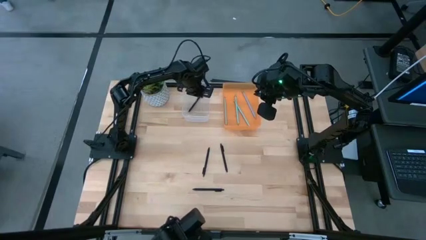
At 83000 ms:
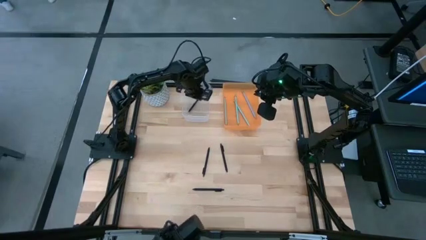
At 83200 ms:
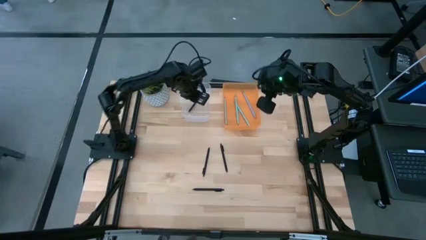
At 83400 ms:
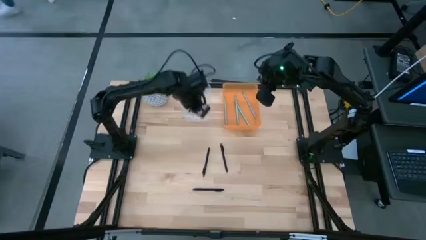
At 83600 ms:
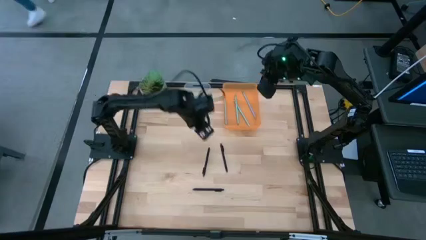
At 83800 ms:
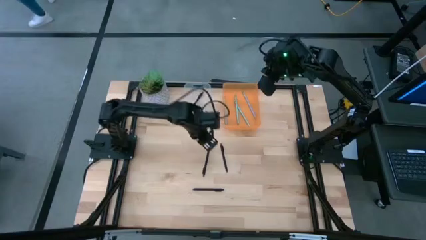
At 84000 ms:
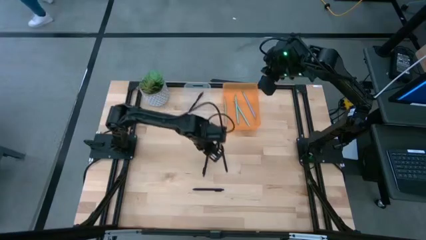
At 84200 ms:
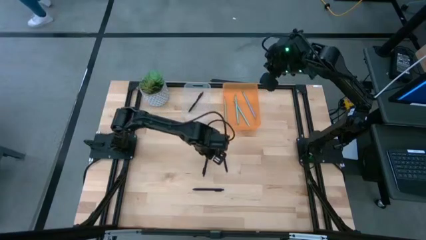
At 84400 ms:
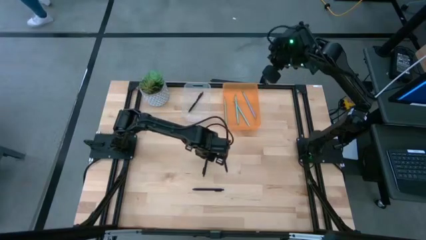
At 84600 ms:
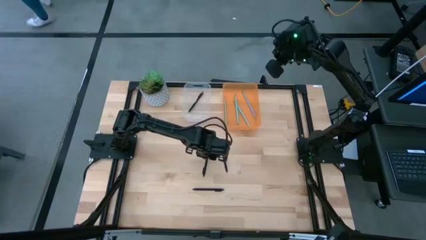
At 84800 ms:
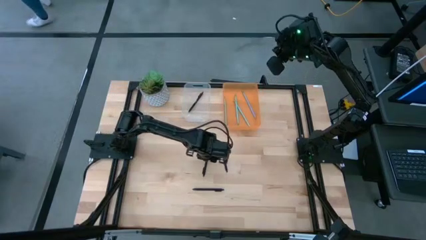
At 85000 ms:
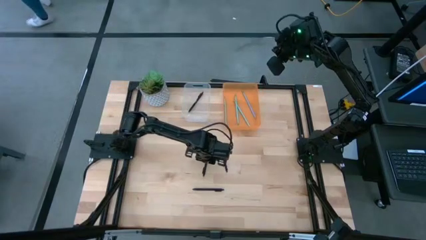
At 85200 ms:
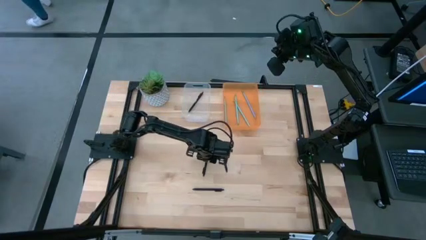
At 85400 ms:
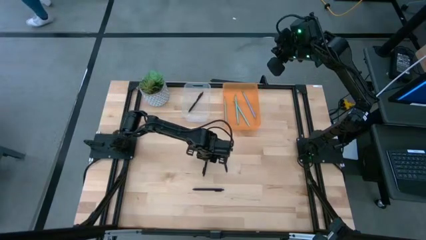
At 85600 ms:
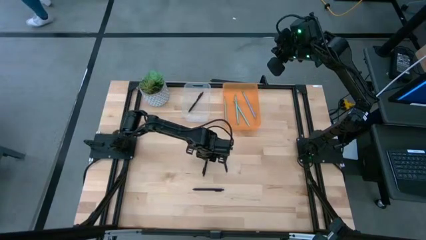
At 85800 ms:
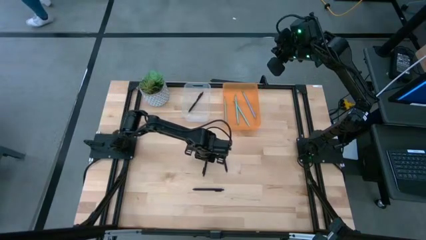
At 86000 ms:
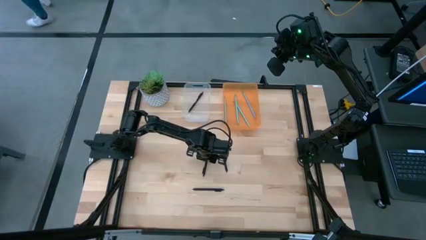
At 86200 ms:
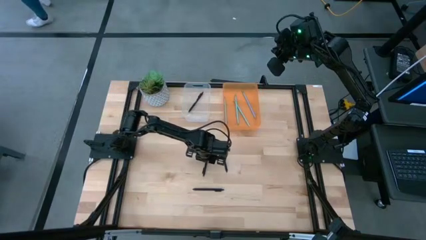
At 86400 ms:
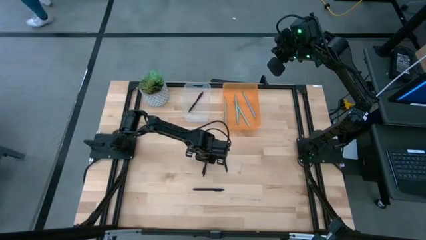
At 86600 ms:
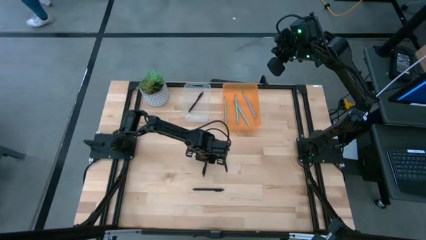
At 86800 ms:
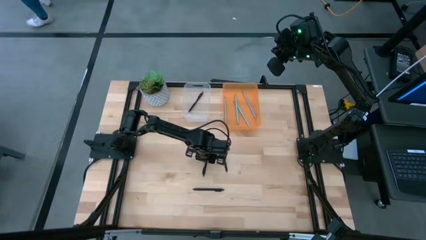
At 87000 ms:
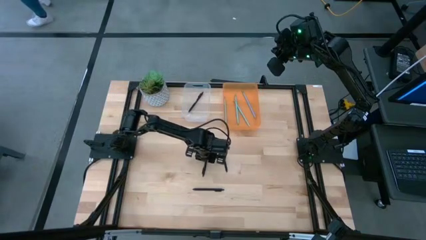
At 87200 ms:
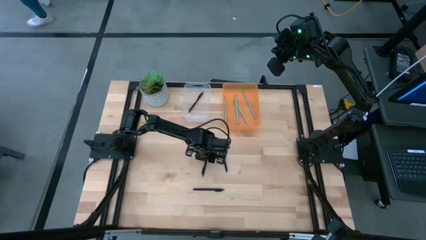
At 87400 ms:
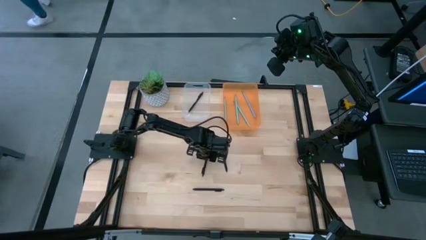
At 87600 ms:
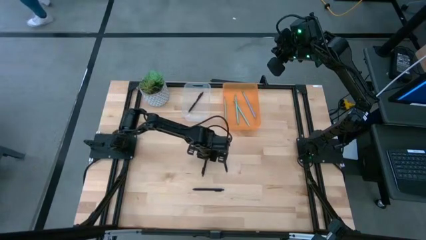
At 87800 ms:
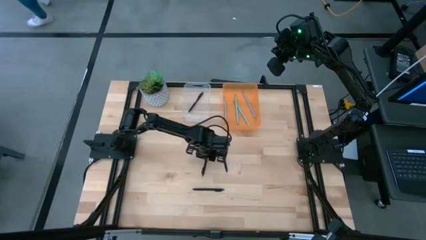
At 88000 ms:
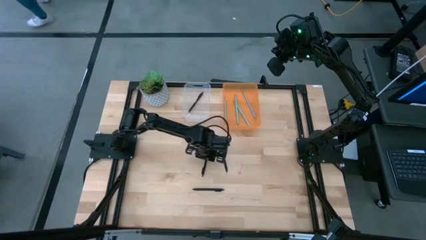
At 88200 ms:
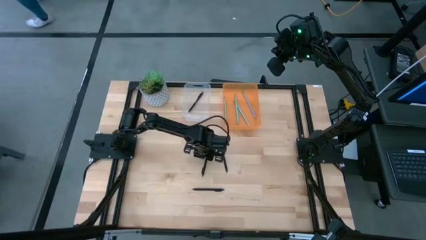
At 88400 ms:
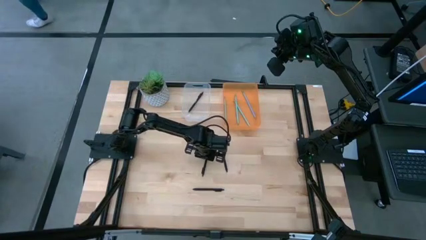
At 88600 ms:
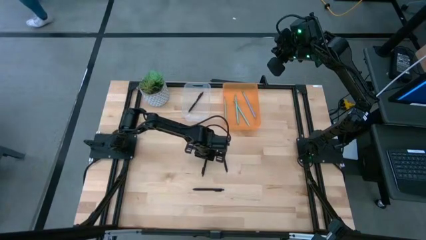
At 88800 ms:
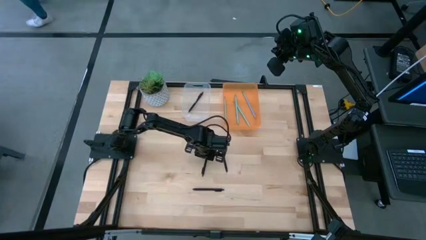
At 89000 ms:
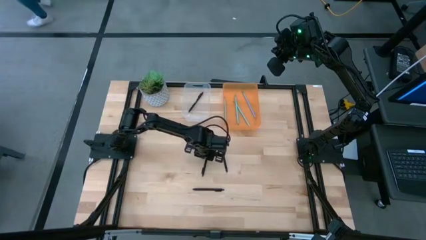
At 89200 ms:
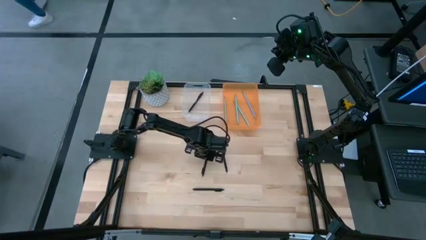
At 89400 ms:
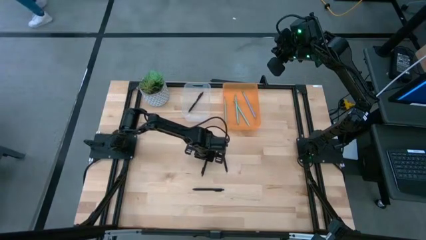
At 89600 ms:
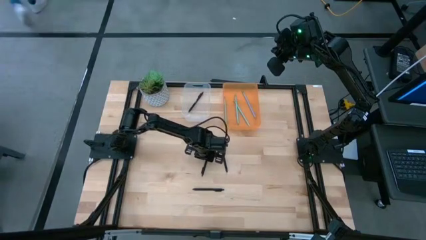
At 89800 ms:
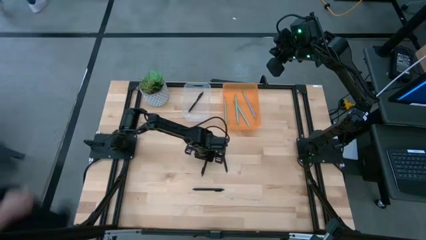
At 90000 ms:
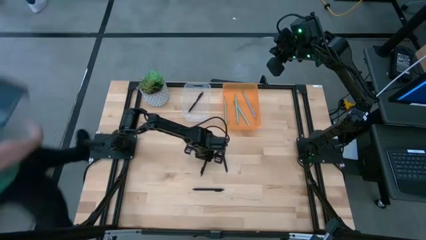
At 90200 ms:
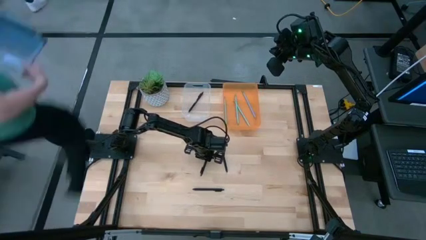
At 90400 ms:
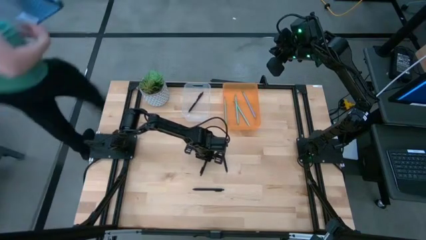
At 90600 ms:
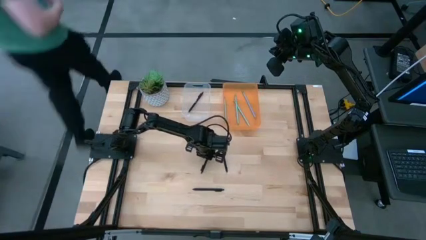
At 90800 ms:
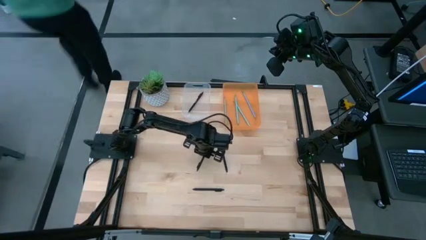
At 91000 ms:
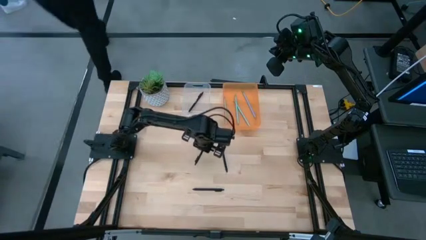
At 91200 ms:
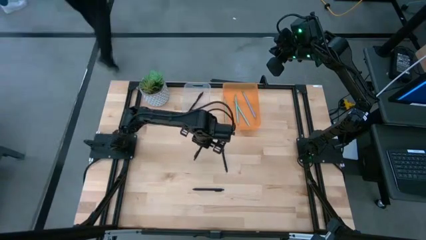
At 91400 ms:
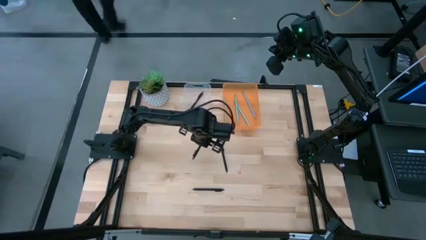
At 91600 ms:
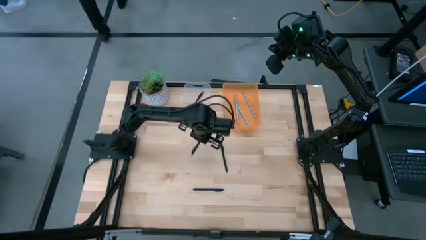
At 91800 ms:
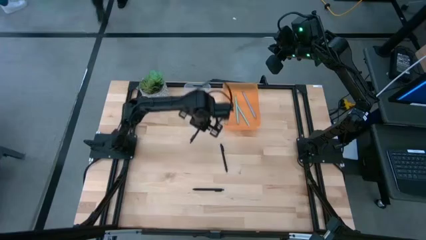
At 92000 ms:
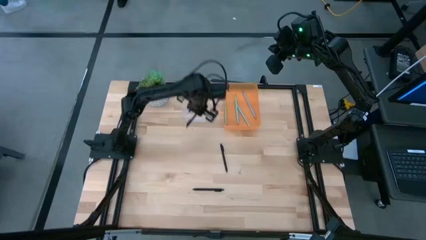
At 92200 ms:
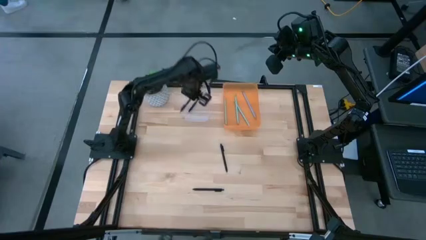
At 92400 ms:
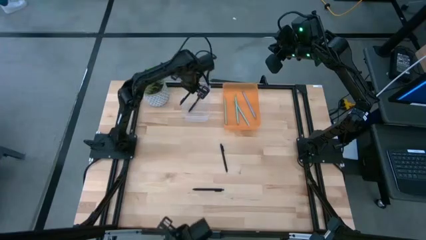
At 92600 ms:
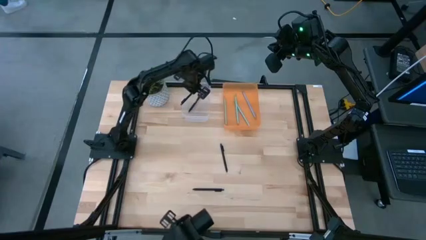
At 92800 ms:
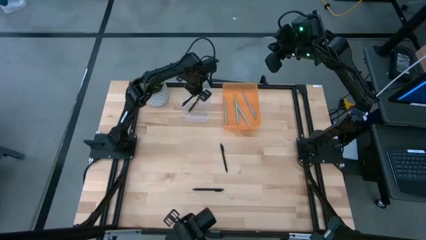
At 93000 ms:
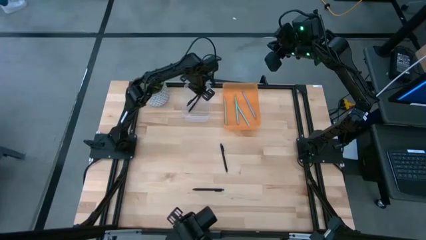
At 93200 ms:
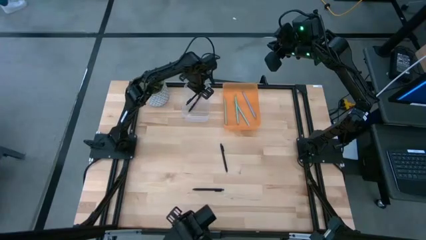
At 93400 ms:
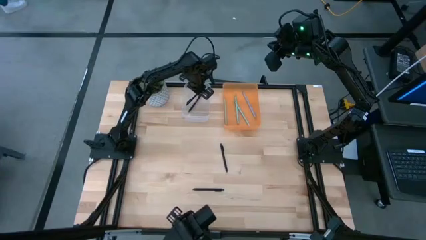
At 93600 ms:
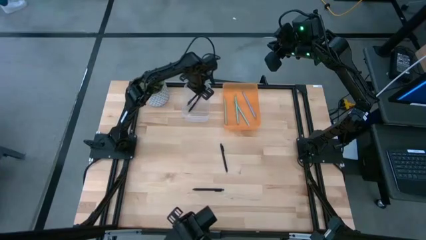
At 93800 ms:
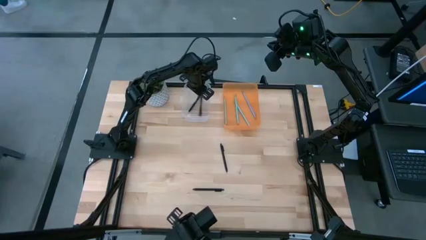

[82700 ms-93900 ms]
Task: Sort pens & pencils
Put the black pen into the transparent bin

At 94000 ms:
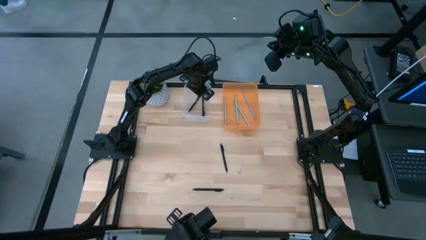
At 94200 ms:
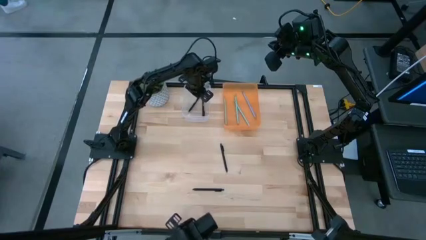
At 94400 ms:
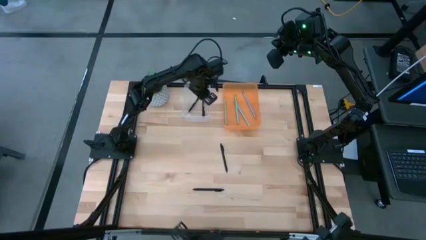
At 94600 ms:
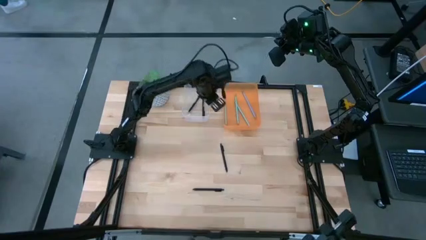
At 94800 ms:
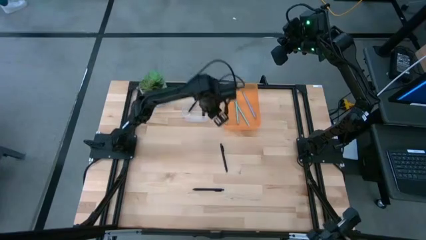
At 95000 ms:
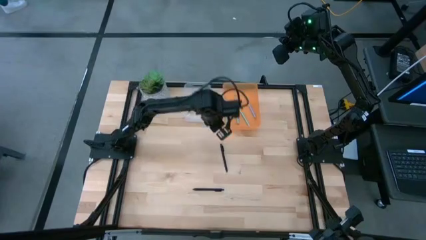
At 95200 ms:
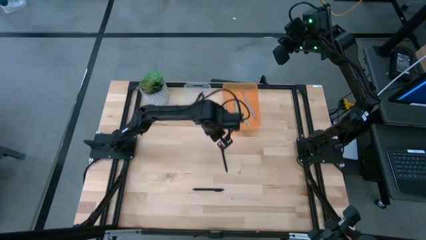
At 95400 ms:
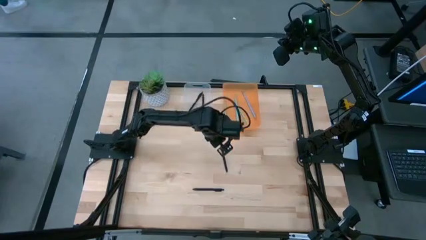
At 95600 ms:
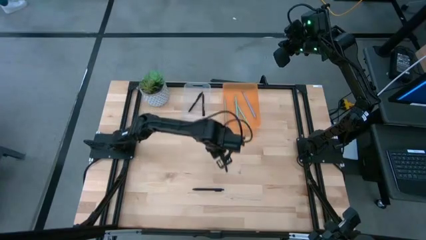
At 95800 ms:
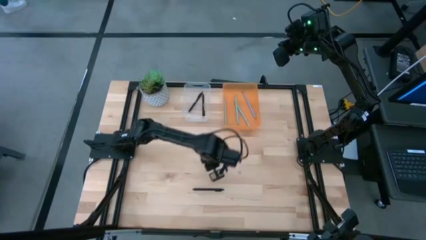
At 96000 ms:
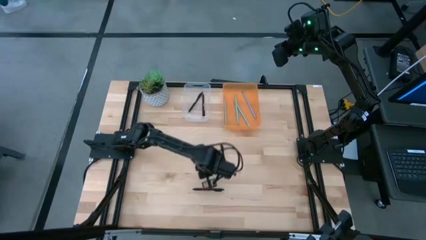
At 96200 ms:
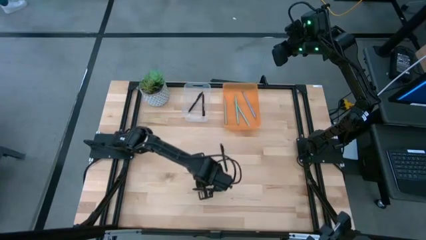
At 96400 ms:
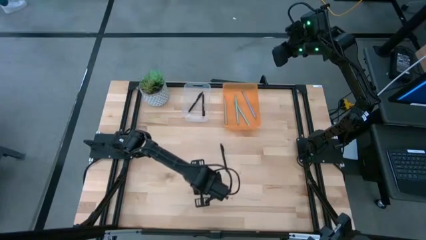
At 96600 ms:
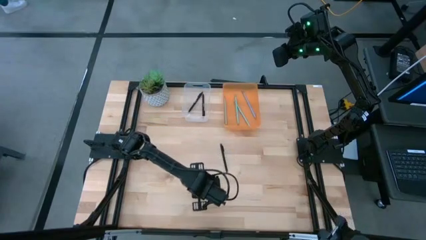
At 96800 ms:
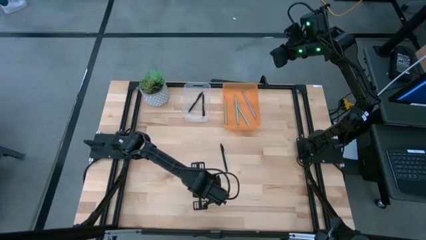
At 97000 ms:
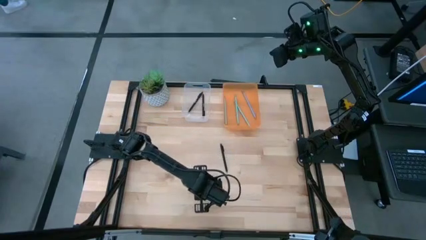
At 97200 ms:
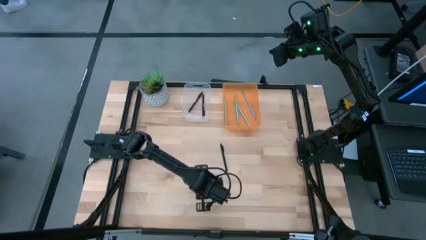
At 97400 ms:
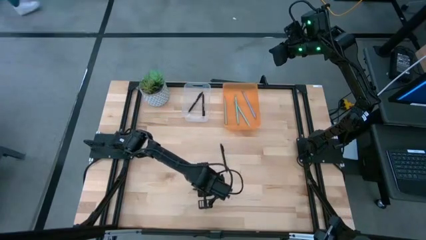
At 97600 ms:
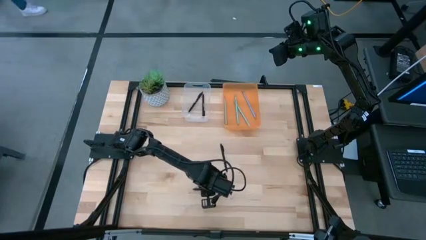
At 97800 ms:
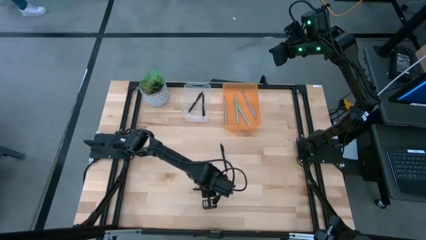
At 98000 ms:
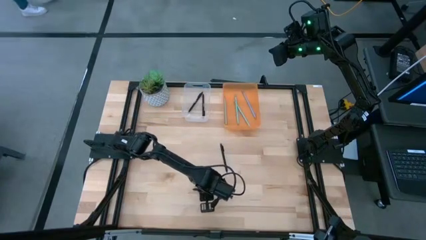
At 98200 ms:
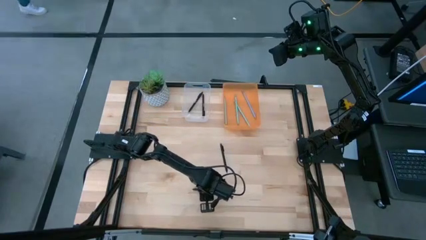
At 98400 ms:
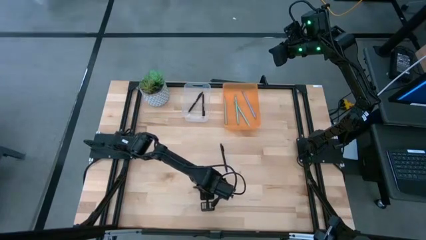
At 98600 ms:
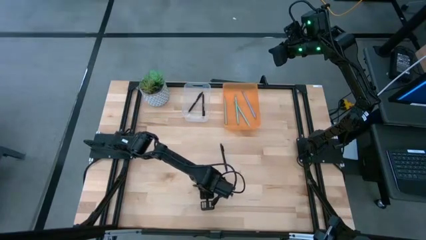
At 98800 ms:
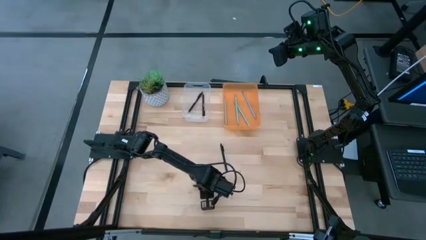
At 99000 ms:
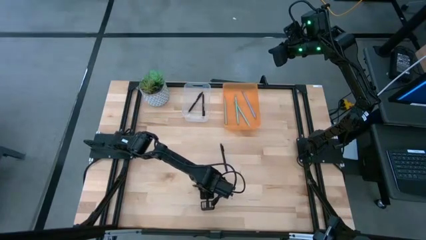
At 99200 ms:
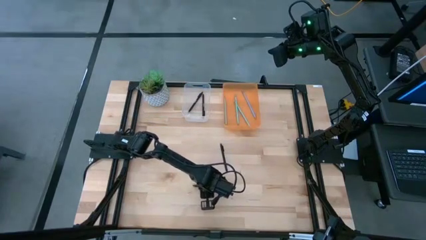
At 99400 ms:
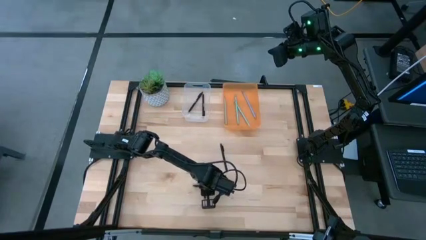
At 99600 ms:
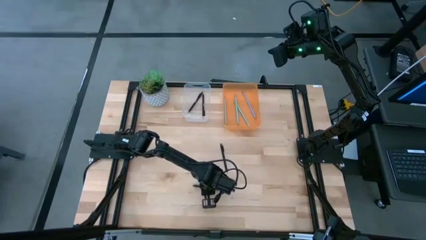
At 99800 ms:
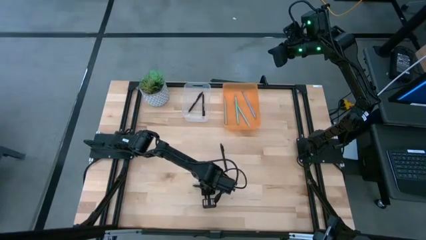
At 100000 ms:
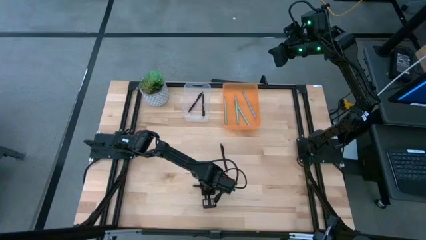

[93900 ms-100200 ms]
Put the black pen into the transparent bin
